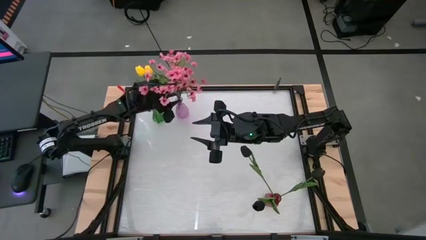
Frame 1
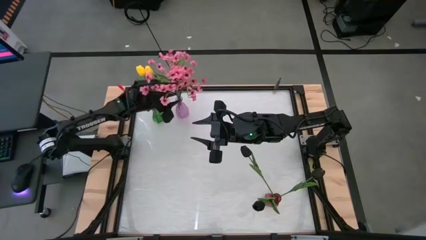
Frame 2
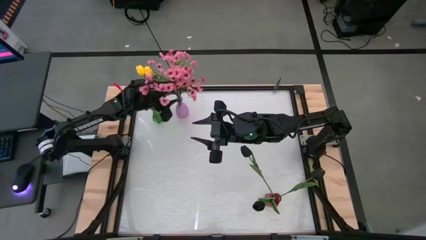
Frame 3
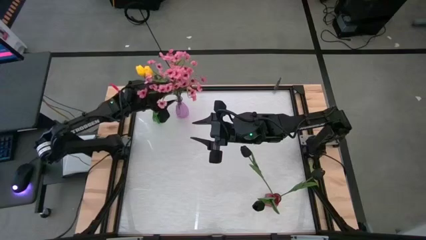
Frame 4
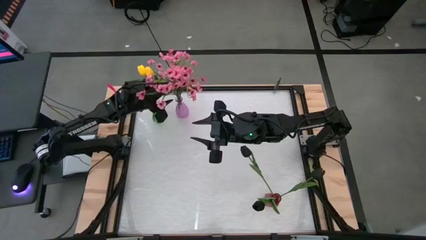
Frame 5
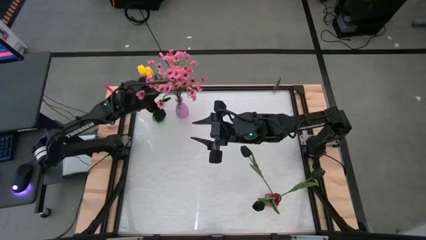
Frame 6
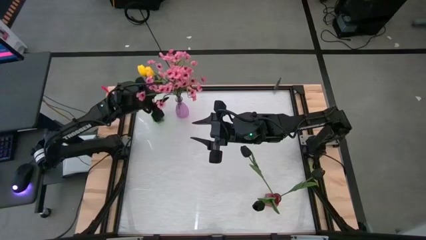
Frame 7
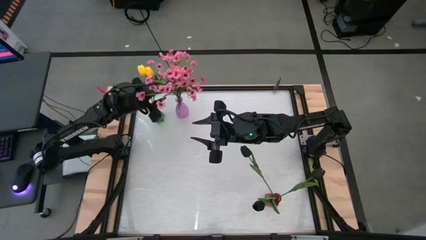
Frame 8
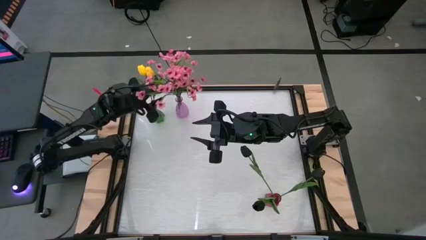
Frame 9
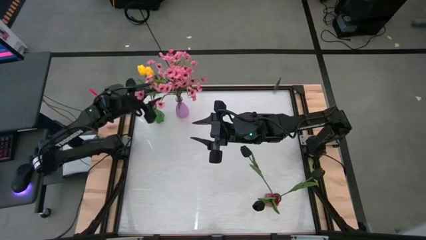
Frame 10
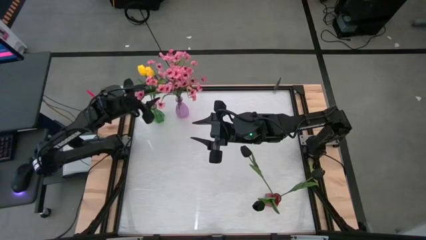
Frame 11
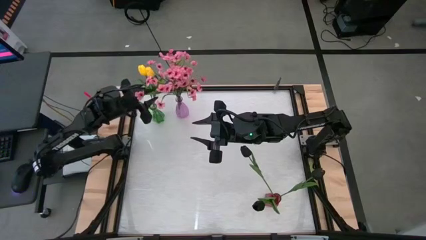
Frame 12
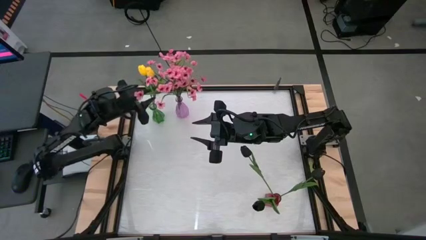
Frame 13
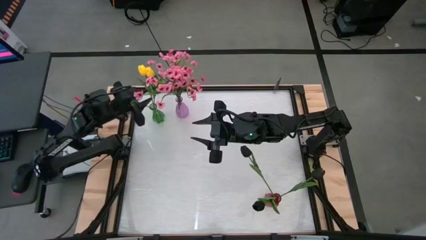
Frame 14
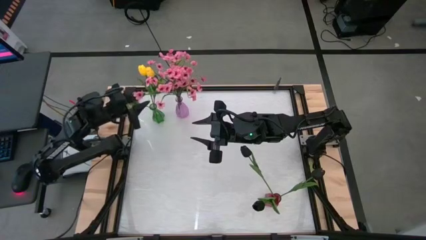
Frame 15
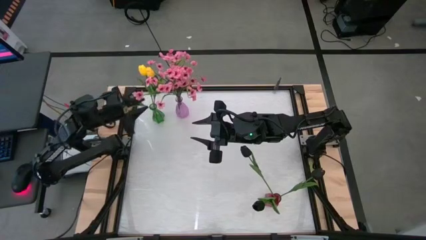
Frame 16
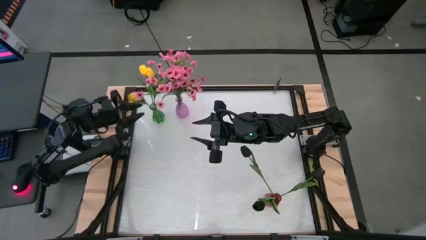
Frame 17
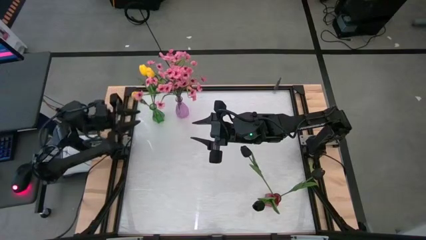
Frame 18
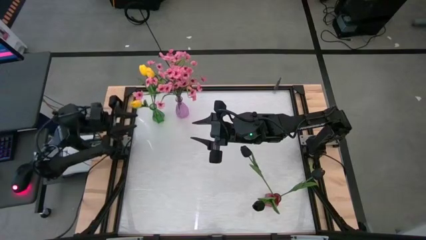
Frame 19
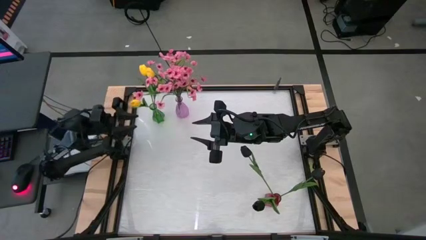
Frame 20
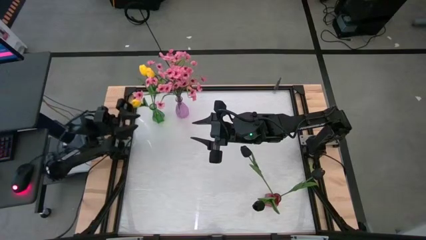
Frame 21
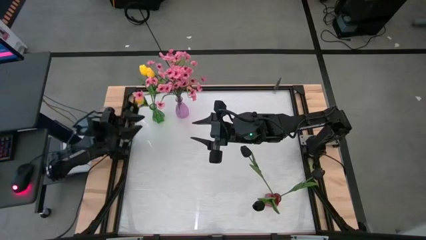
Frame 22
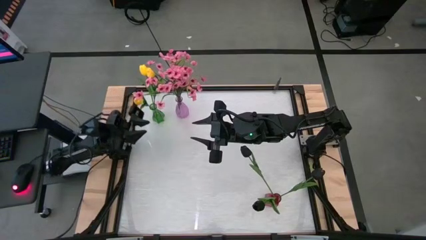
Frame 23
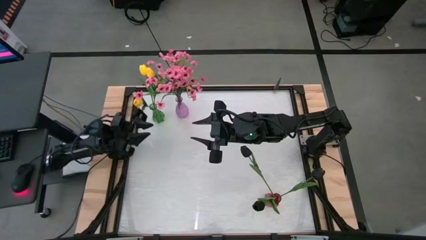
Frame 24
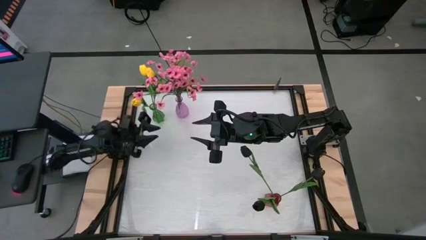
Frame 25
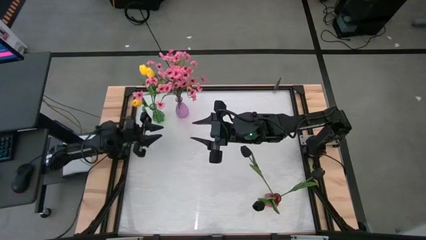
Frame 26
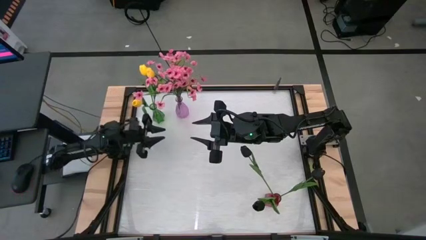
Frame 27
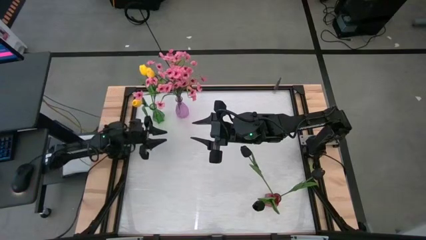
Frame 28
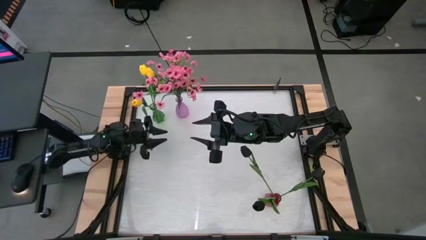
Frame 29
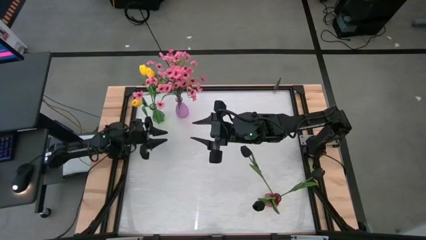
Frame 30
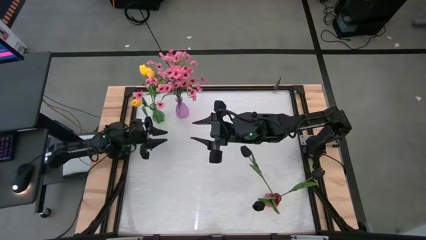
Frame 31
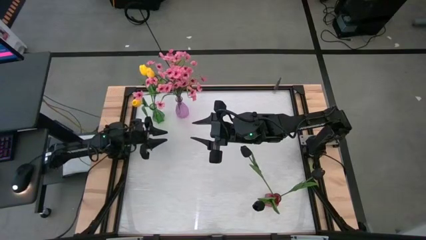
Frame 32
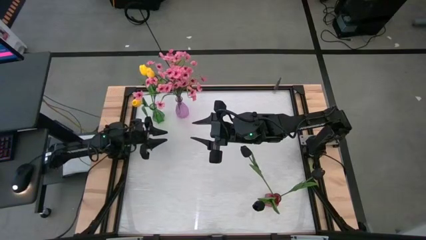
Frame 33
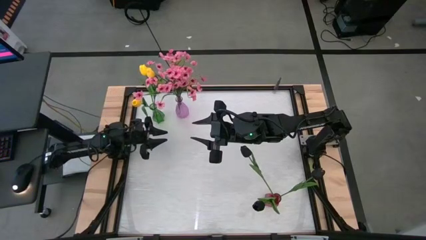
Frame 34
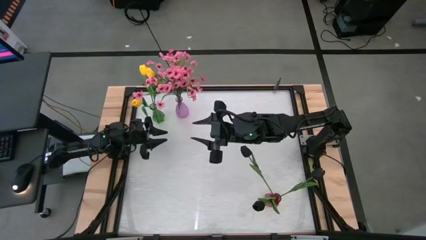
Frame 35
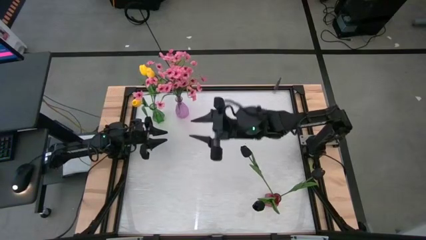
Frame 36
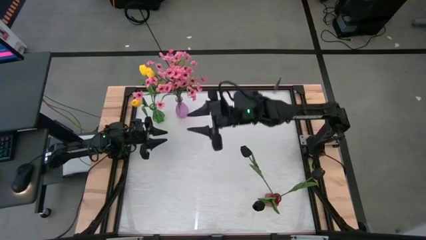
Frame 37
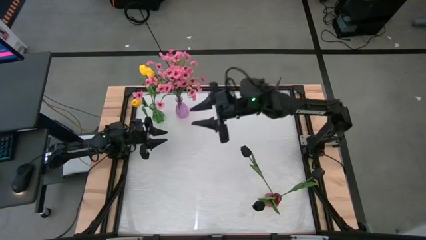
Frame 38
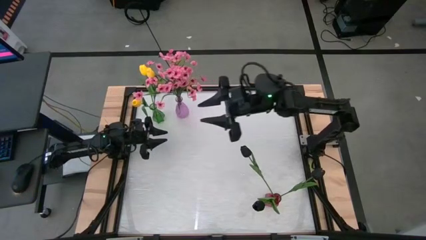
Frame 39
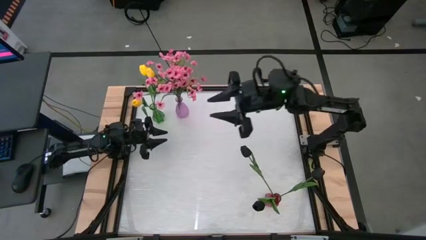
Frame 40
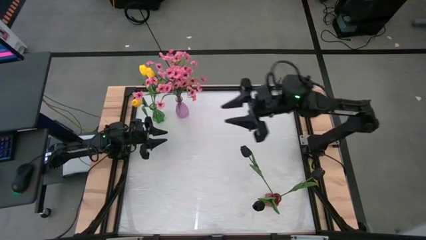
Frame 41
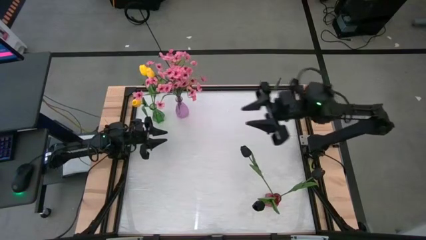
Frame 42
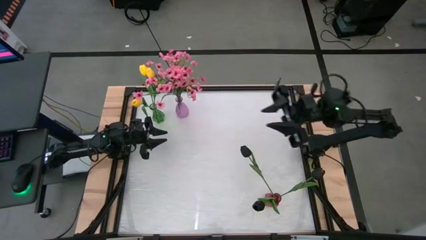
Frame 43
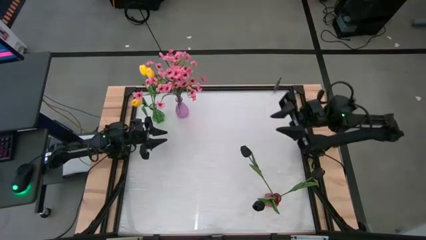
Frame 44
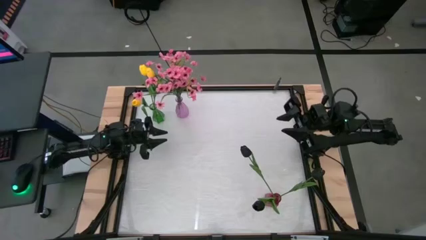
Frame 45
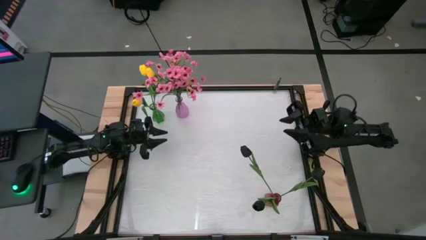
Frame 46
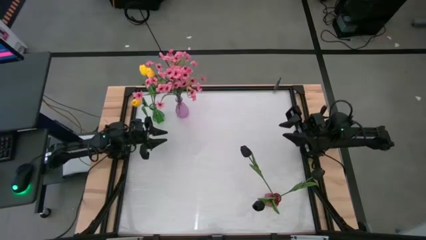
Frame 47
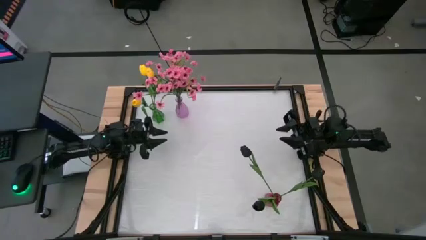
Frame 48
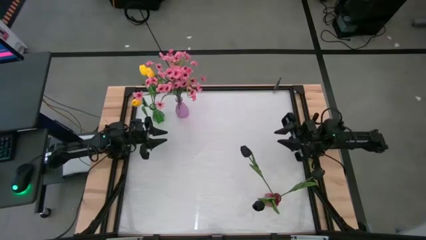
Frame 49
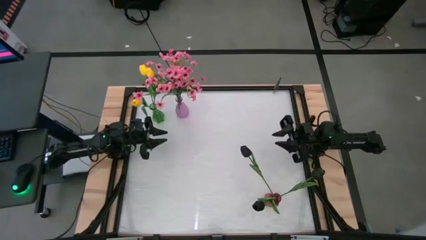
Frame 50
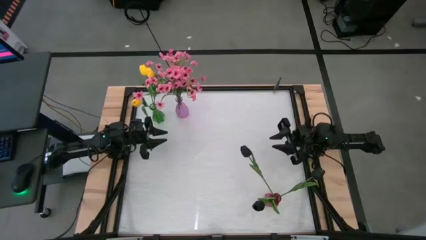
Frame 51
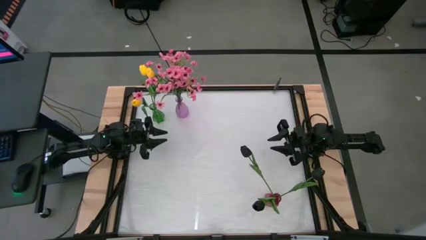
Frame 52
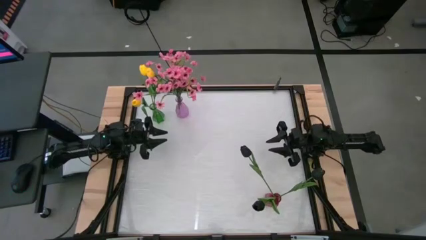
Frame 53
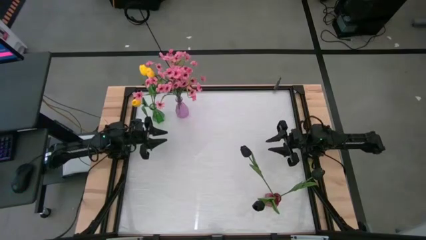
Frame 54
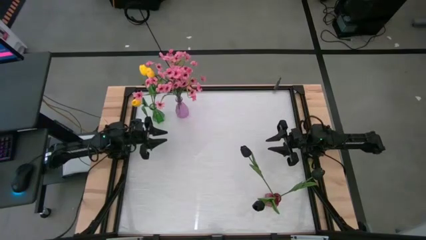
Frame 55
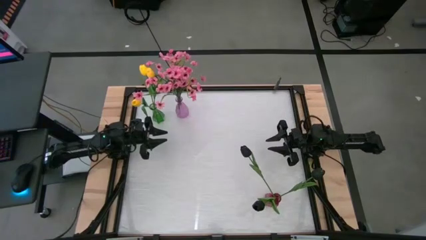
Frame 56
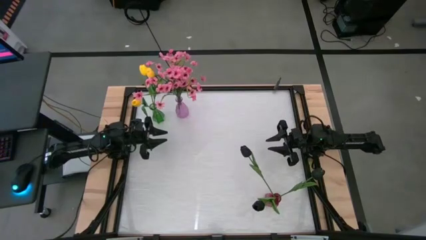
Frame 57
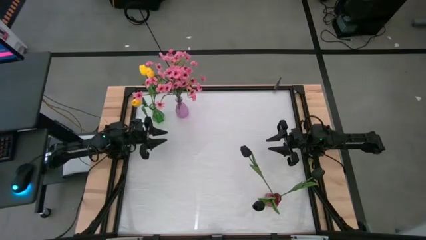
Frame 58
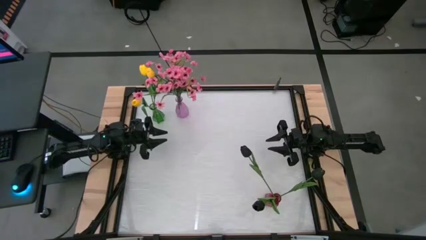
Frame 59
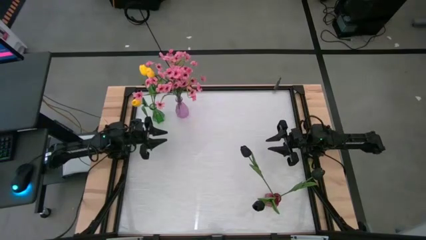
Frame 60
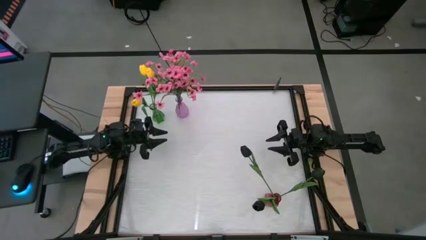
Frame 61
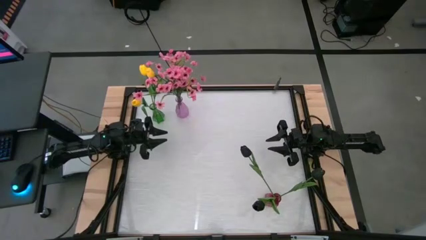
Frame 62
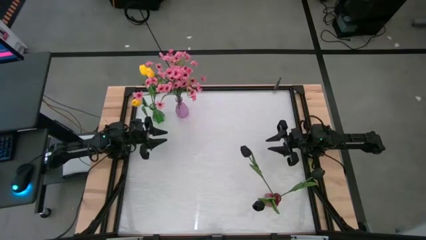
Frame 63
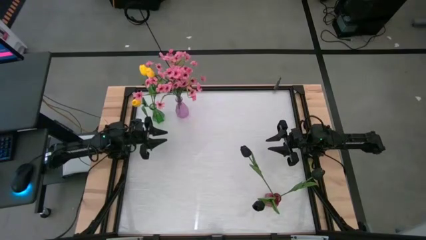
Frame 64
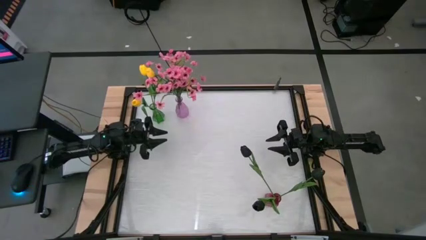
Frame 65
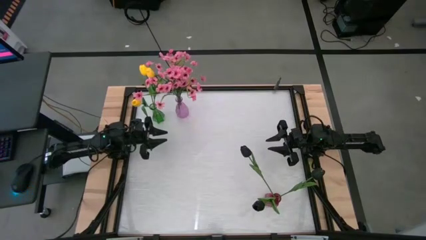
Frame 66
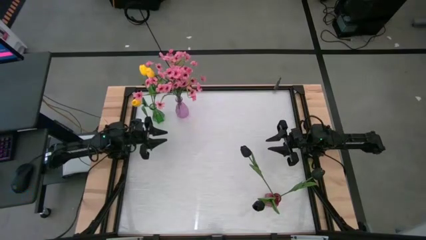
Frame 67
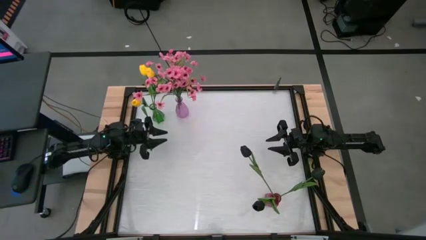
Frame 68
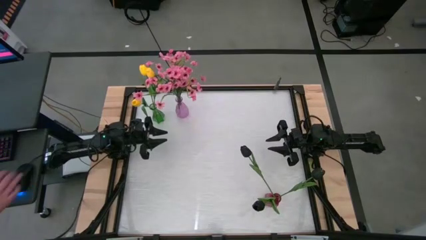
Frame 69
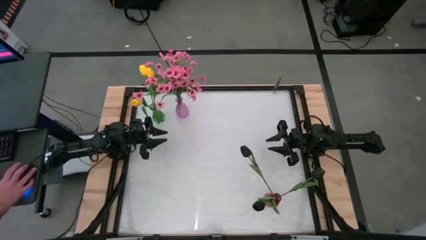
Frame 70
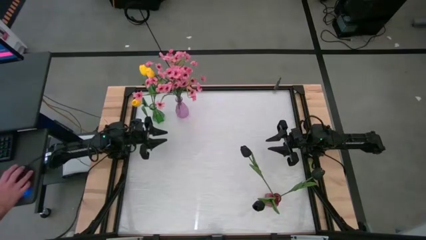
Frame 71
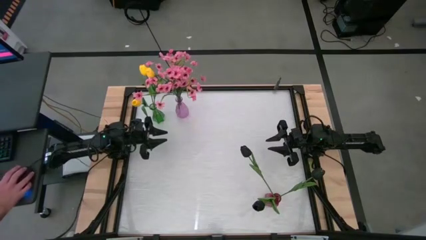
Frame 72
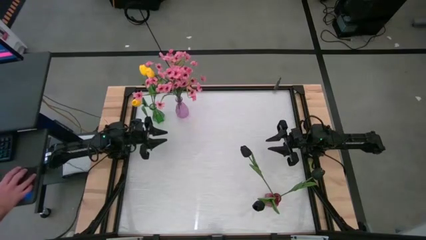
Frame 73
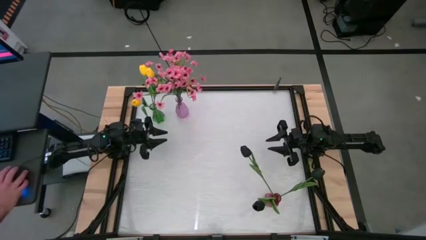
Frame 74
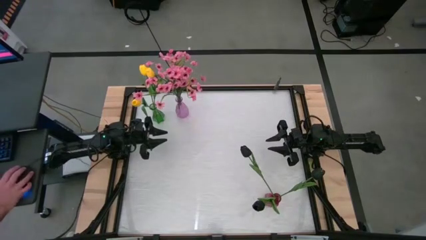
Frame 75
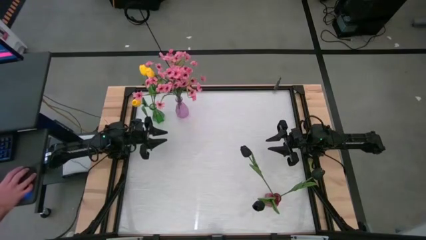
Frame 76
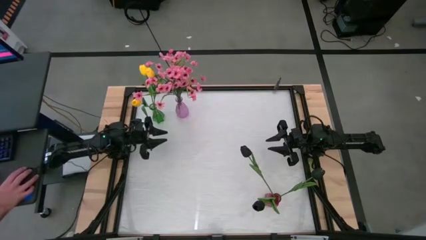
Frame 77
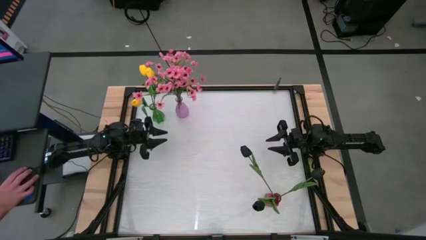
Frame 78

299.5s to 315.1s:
Task: Sort flowers into vase by color
Return to home position
